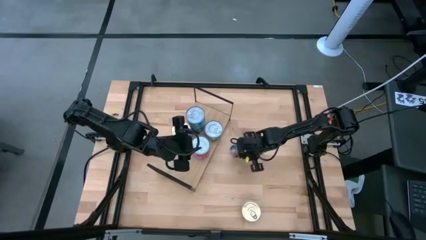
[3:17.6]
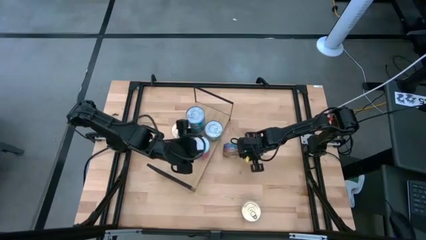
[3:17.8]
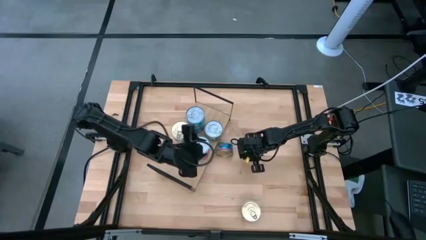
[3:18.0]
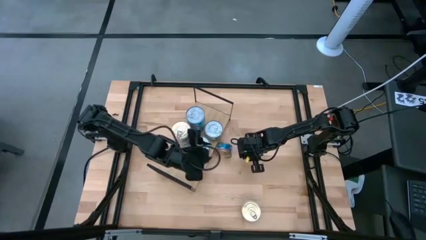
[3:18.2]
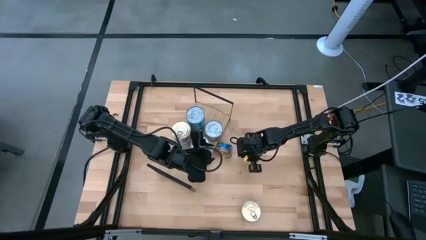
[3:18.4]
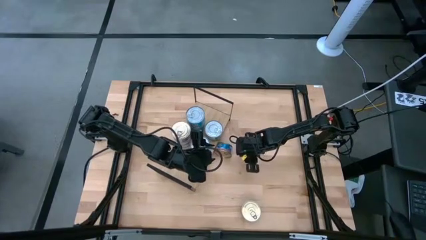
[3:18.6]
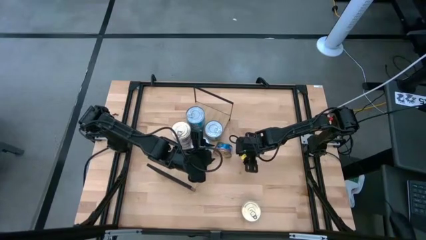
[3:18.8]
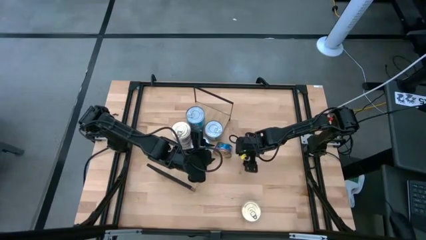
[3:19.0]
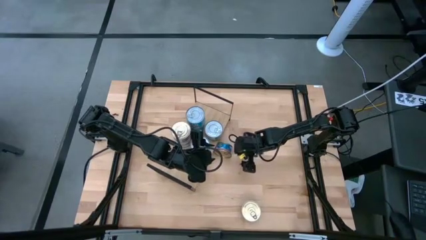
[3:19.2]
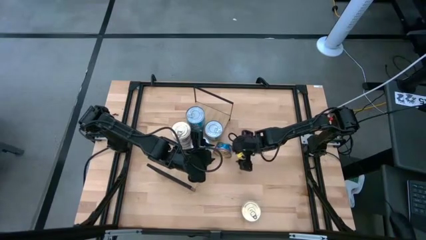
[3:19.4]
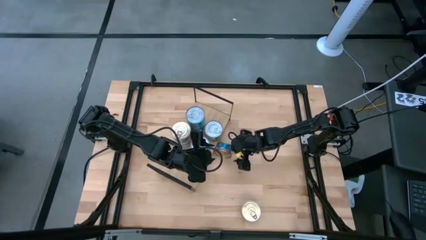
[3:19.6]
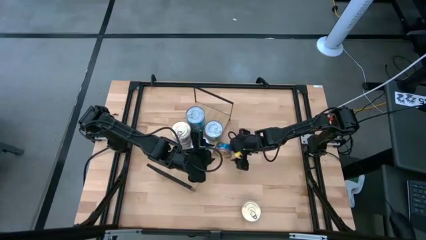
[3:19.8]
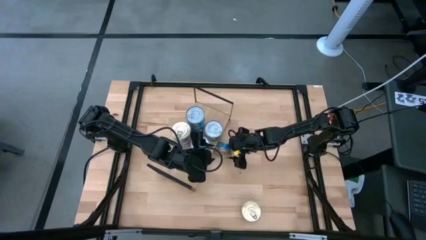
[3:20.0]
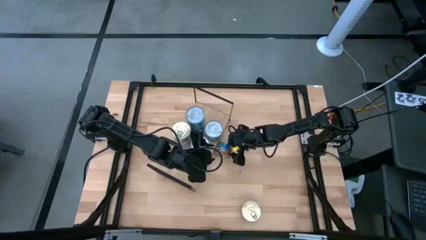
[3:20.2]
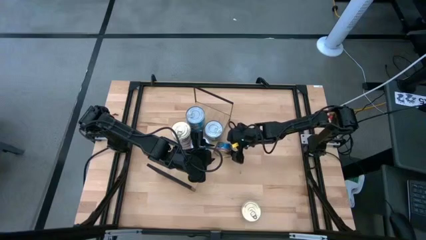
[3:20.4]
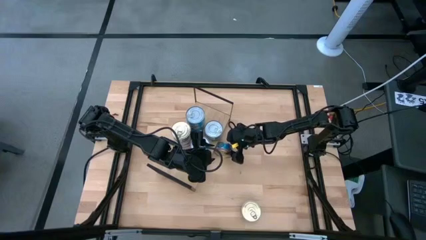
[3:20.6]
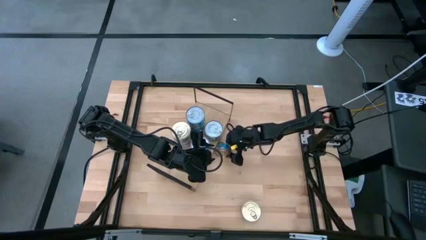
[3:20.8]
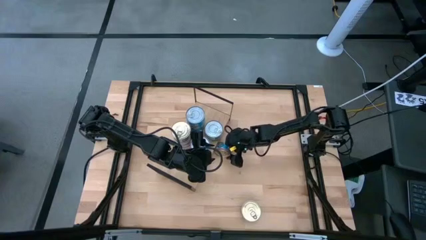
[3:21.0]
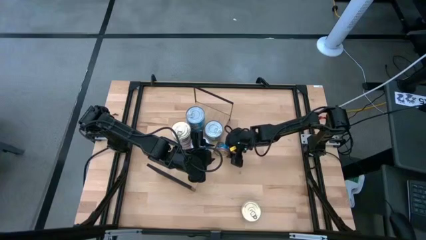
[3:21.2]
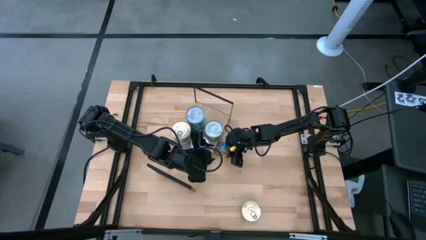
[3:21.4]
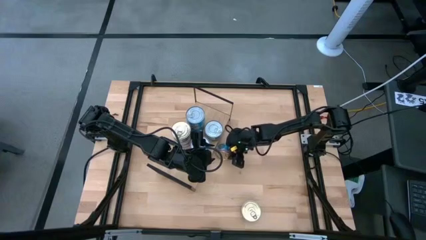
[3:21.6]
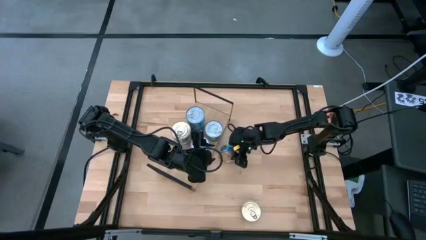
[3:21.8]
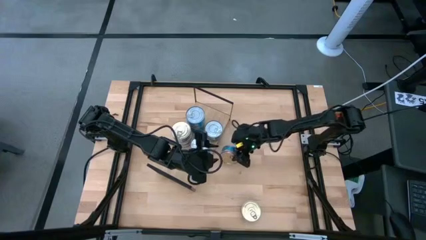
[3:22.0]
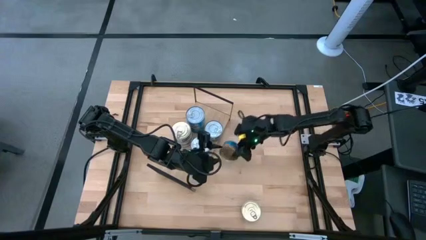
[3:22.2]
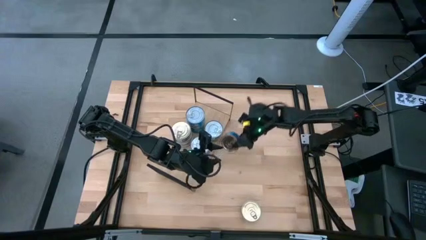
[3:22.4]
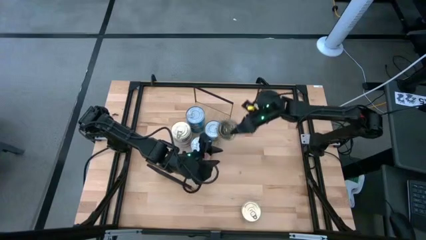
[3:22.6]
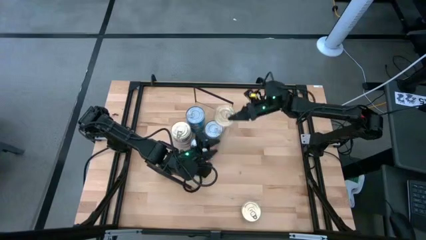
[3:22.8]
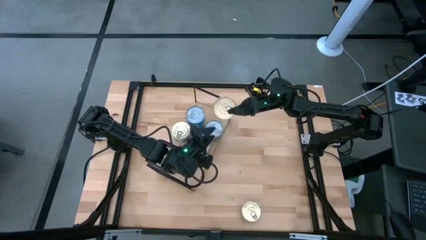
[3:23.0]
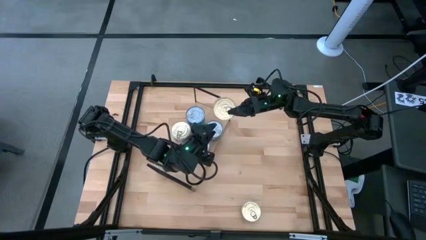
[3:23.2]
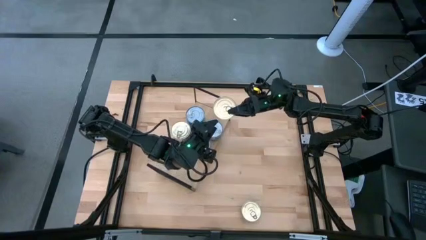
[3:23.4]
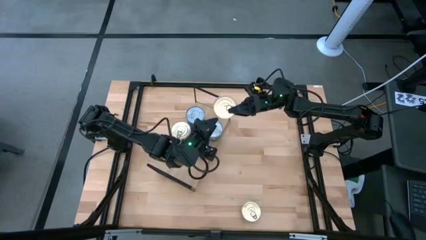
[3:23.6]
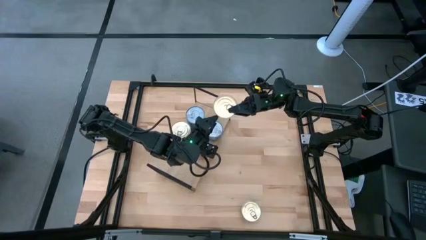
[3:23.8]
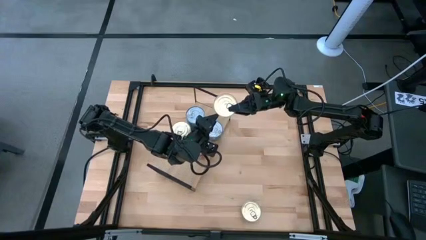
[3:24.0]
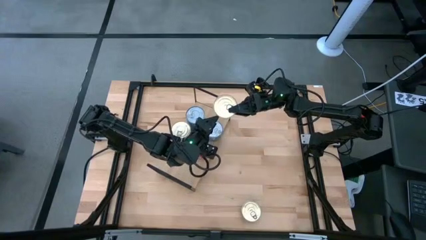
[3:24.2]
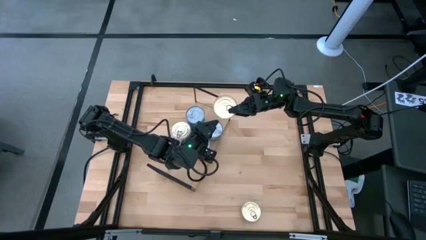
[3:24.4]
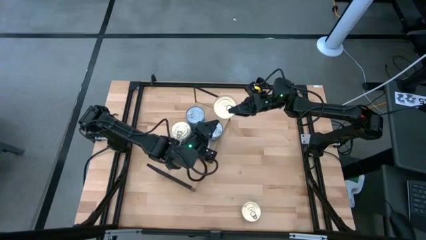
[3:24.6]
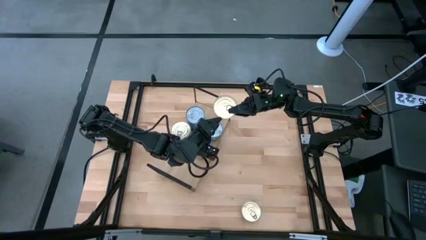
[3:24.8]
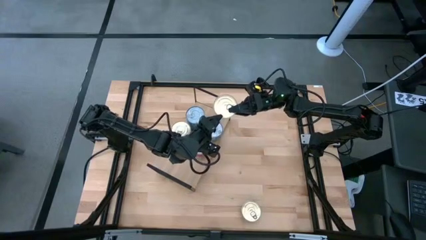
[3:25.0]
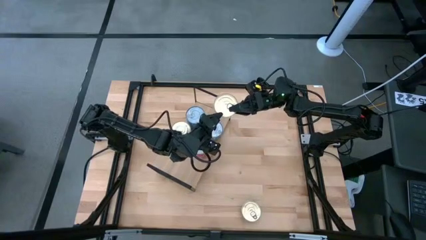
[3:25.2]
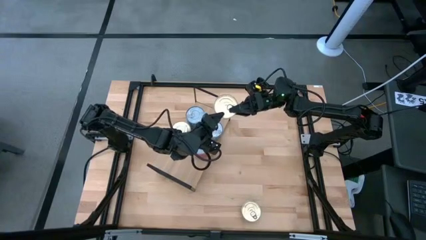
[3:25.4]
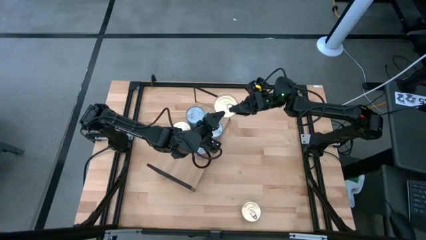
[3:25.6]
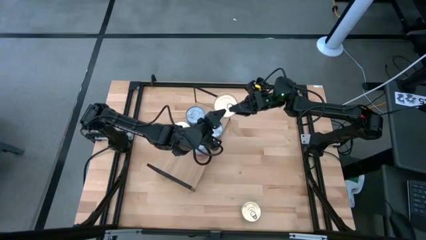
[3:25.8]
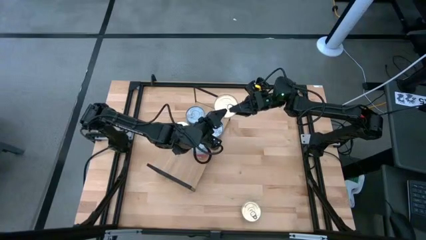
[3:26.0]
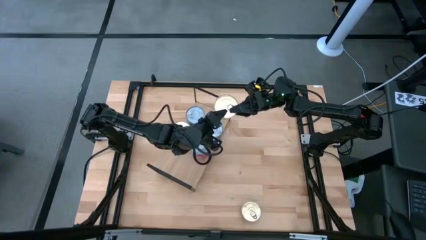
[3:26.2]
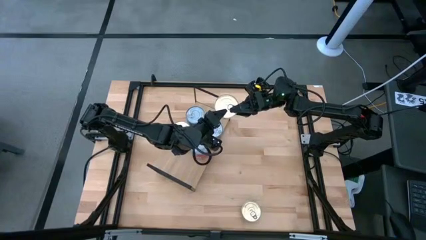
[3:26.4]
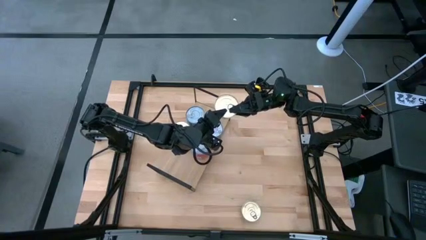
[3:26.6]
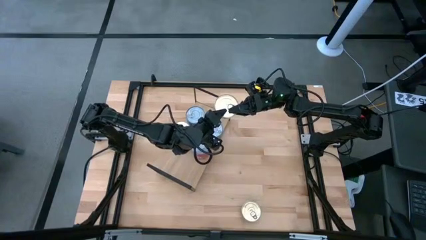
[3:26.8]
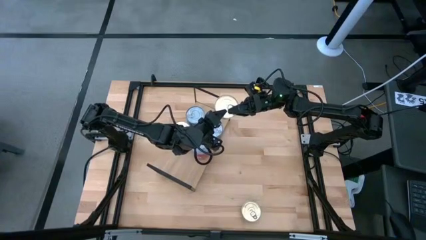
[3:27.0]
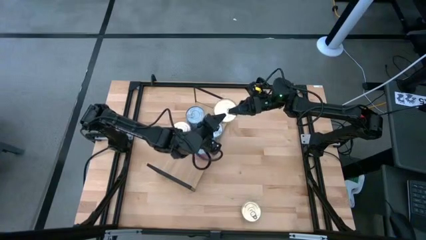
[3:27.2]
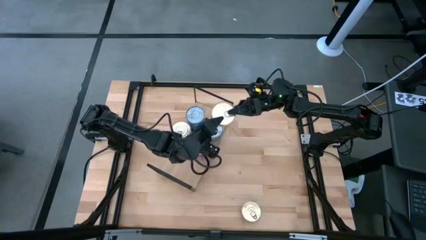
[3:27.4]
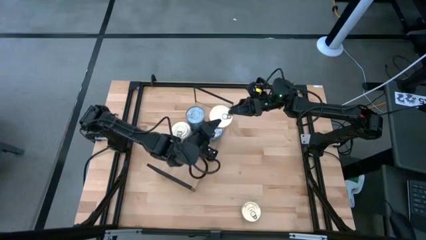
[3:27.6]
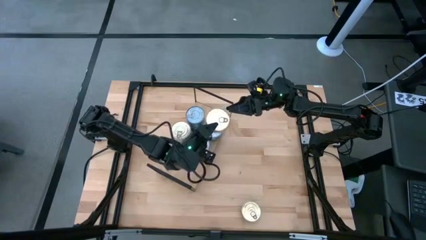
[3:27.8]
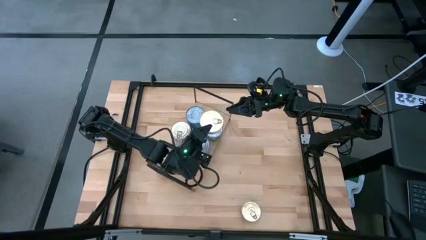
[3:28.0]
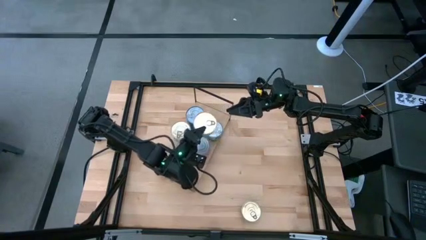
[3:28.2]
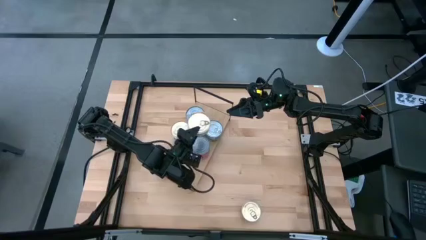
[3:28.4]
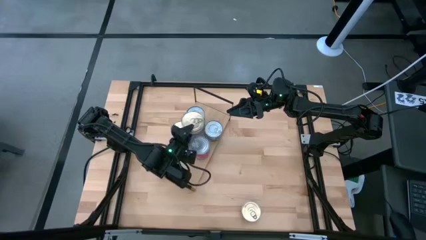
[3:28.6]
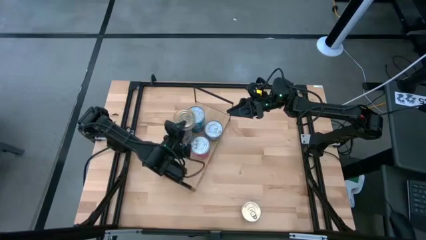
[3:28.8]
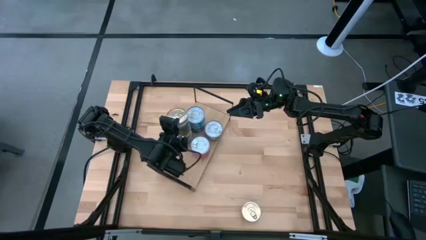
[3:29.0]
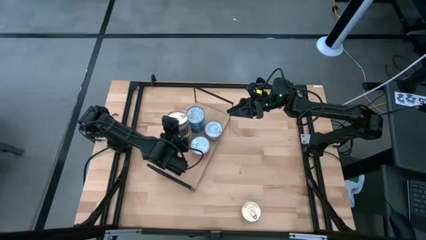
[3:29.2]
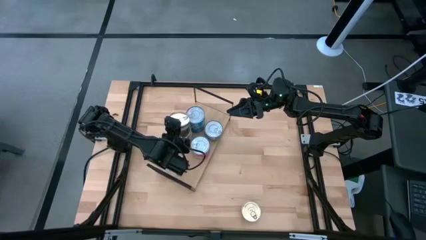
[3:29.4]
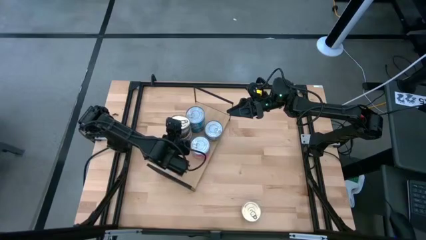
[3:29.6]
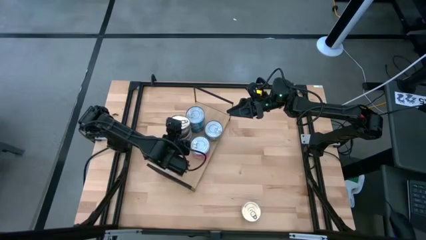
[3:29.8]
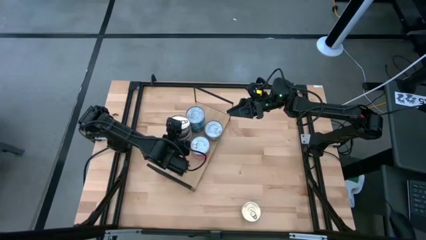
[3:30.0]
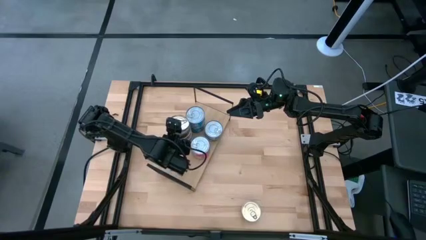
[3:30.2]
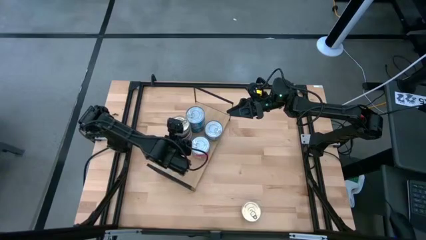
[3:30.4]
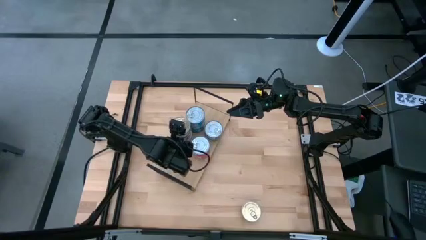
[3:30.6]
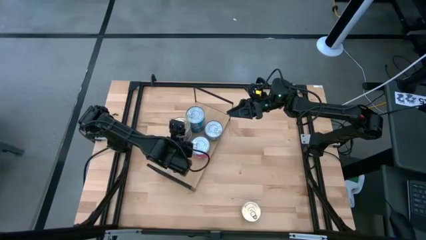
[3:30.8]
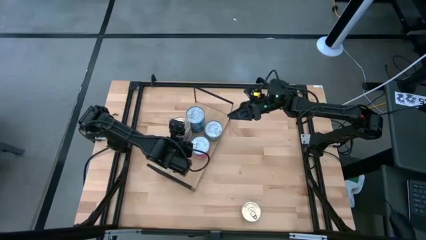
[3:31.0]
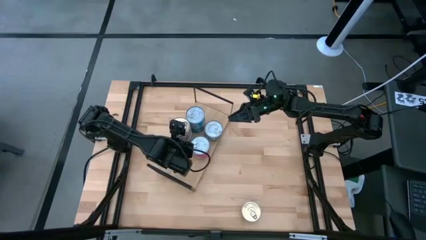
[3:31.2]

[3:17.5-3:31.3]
Task: Stack canned seafood by type on shelf
Stack the blue tuna can on top of the blue tuna can on the shelf

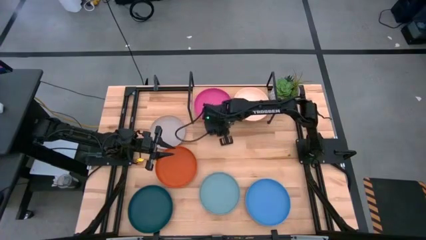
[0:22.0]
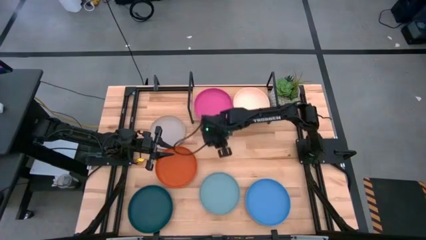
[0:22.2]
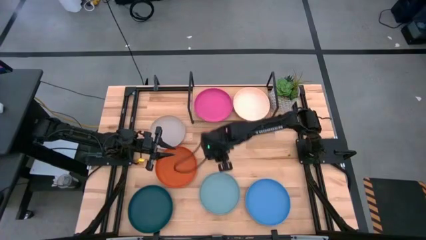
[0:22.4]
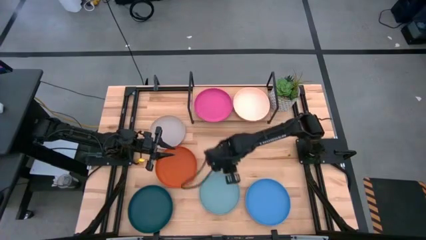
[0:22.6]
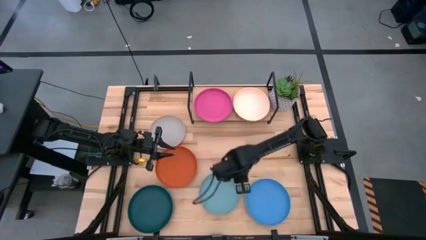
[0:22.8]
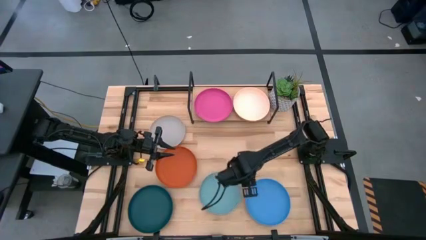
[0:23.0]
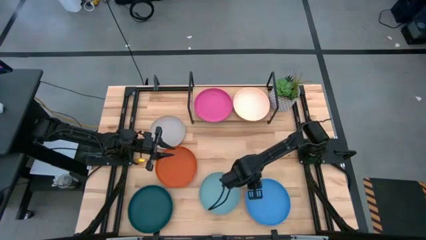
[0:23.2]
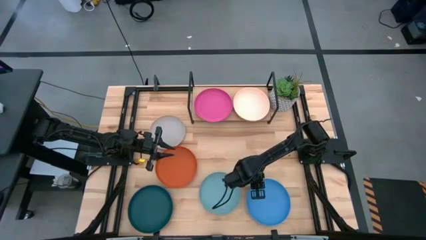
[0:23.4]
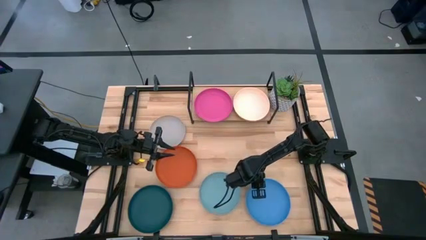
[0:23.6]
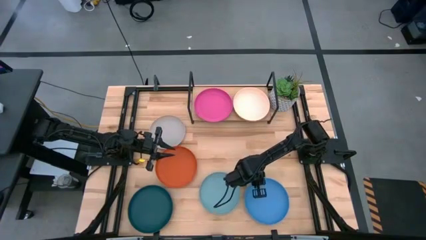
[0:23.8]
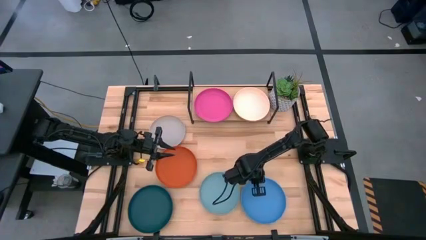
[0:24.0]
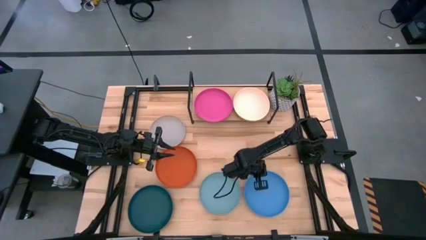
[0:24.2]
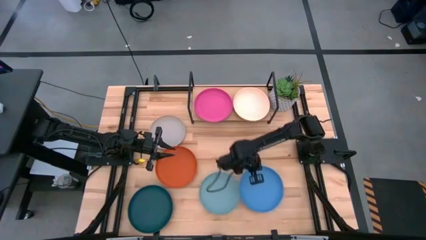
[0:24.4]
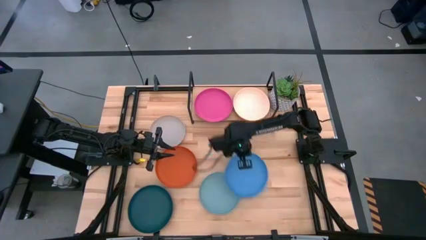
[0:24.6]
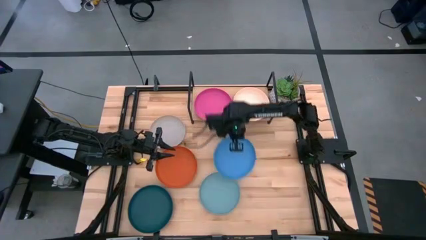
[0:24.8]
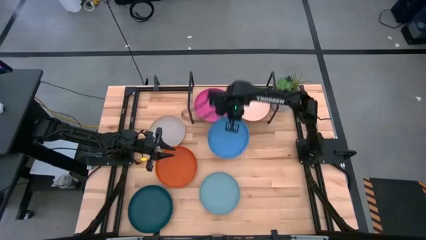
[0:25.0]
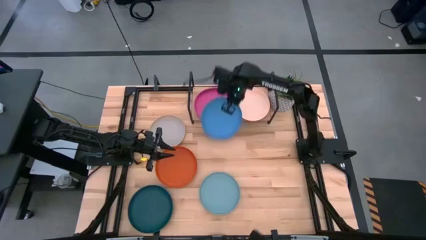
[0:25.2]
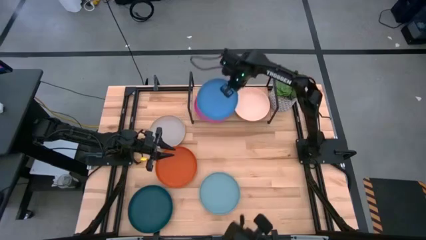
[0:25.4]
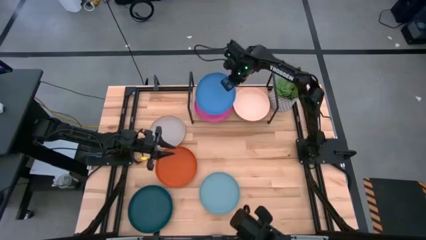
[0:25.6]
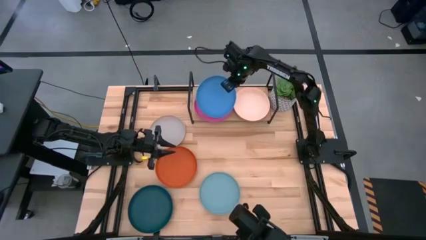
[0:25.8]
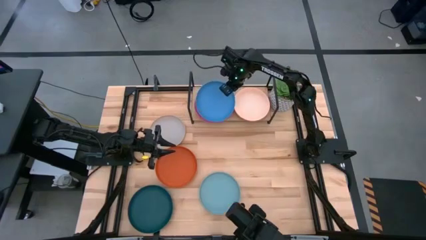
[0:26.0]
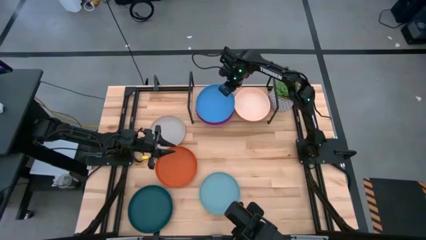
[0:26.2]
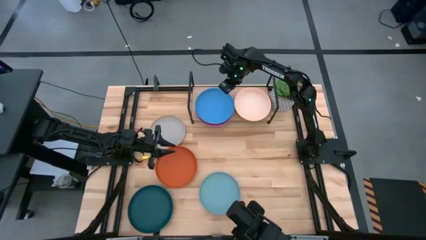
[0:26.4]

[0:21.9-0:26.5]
Task: Place and stack plates onto a shelf
Stack the blue plate on top of the pink plate on the shelf
